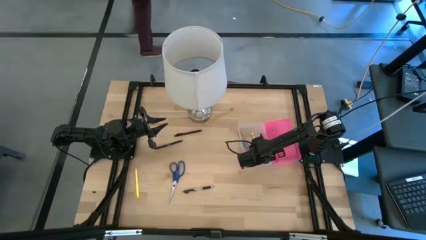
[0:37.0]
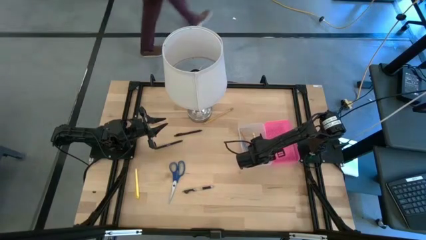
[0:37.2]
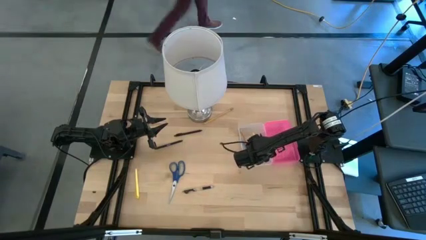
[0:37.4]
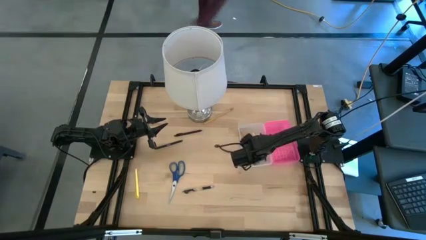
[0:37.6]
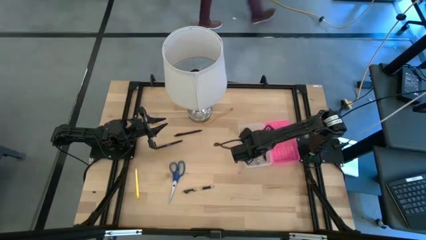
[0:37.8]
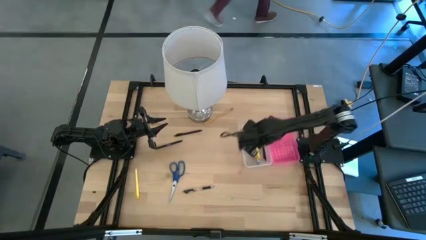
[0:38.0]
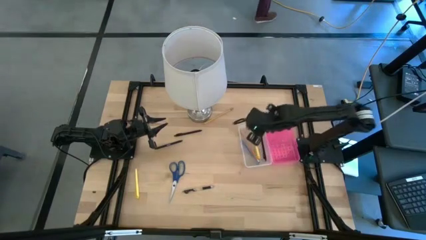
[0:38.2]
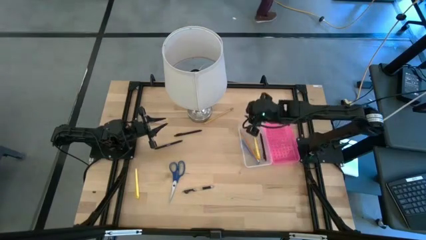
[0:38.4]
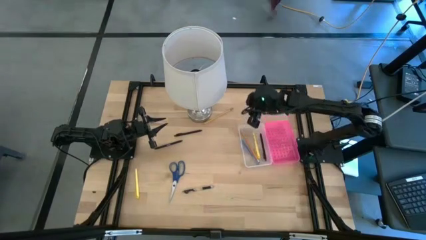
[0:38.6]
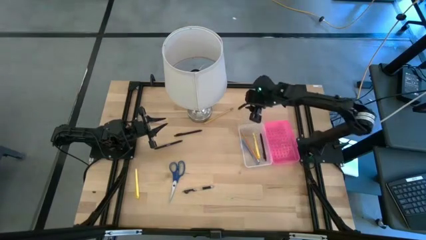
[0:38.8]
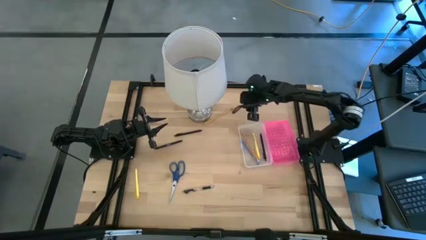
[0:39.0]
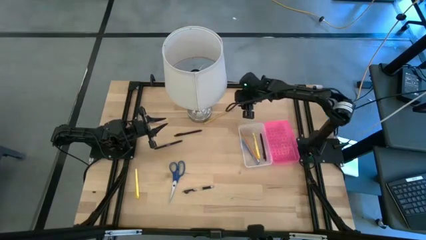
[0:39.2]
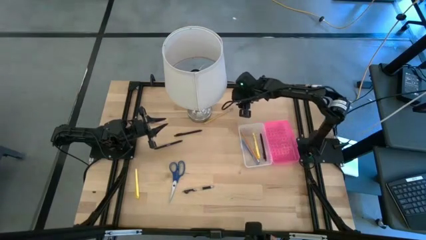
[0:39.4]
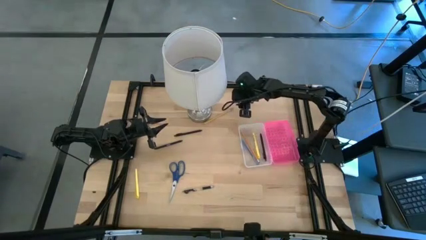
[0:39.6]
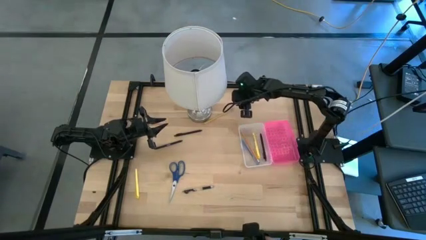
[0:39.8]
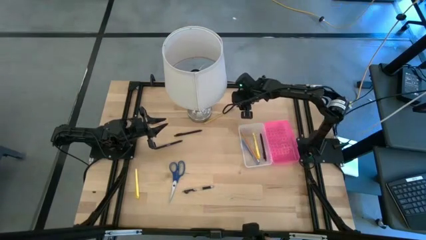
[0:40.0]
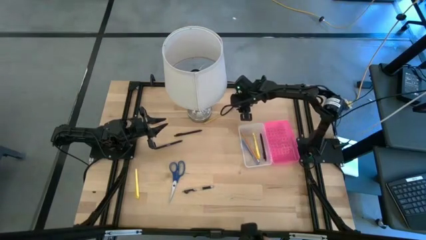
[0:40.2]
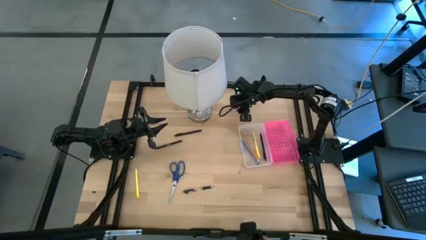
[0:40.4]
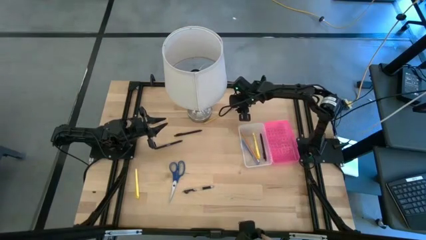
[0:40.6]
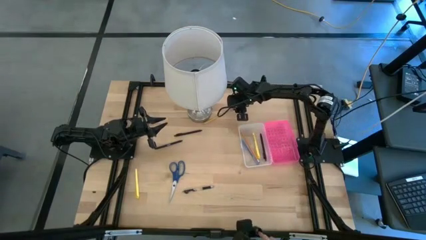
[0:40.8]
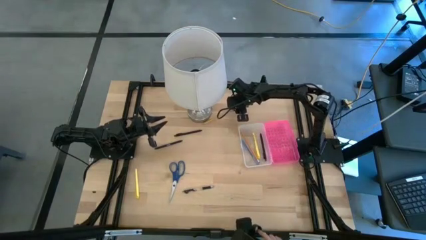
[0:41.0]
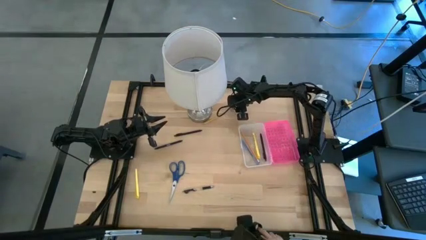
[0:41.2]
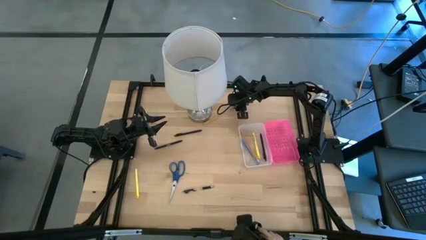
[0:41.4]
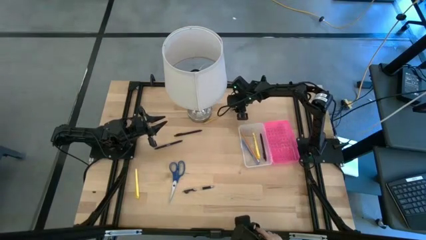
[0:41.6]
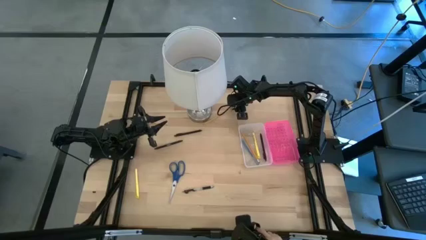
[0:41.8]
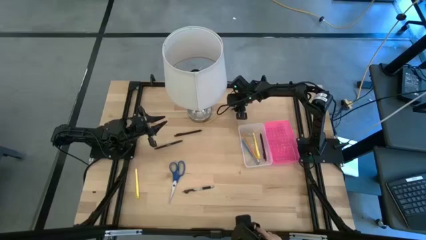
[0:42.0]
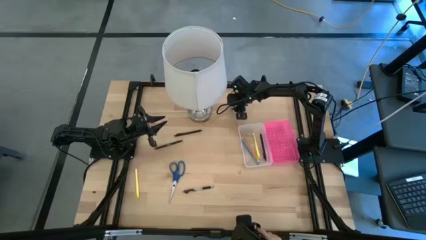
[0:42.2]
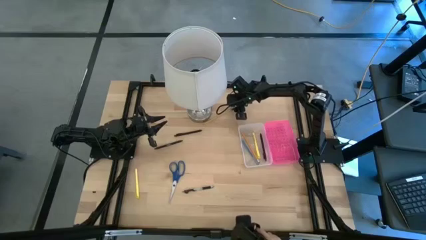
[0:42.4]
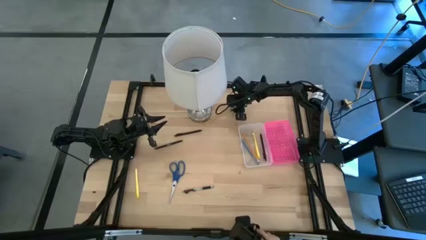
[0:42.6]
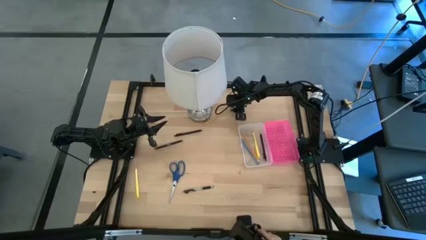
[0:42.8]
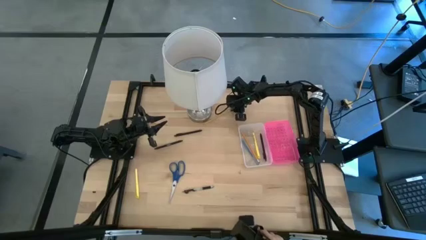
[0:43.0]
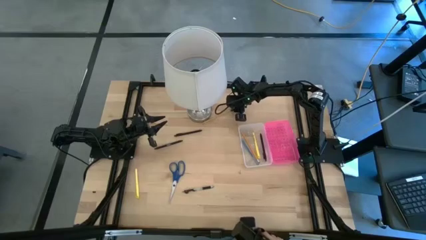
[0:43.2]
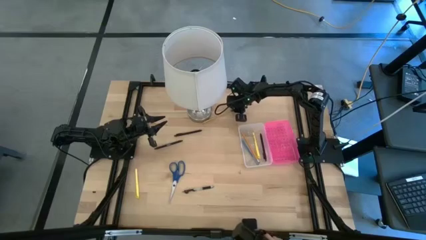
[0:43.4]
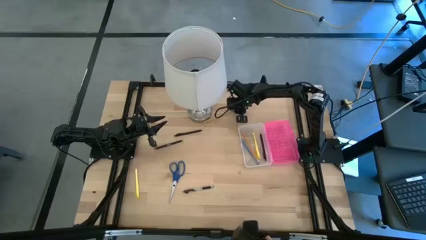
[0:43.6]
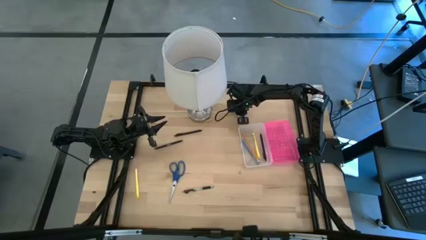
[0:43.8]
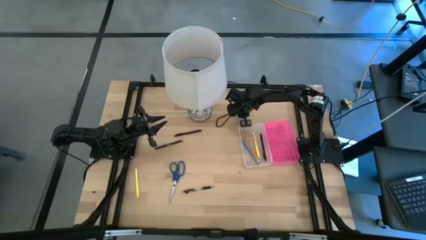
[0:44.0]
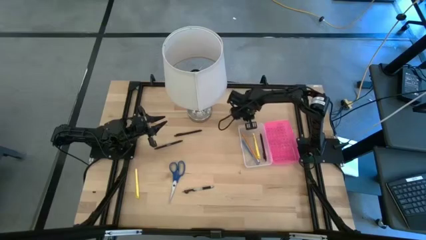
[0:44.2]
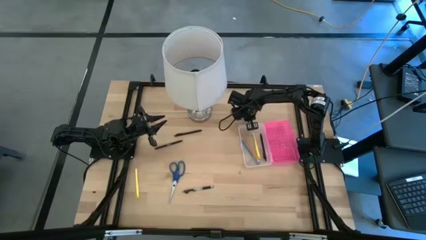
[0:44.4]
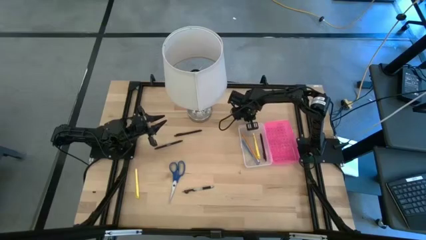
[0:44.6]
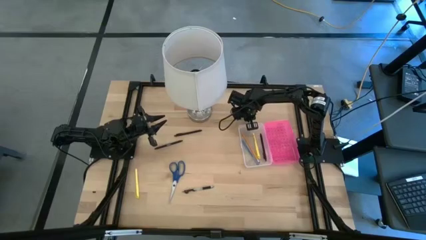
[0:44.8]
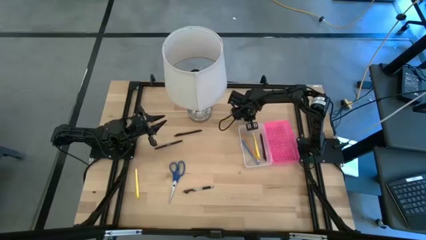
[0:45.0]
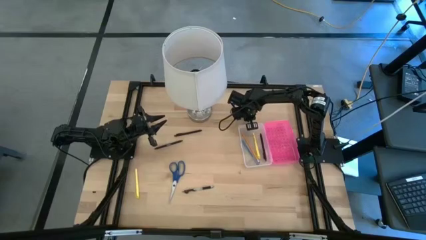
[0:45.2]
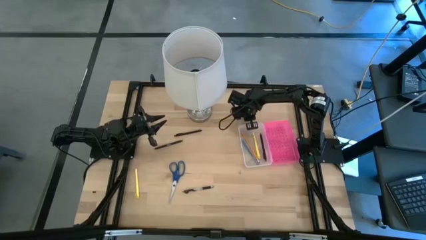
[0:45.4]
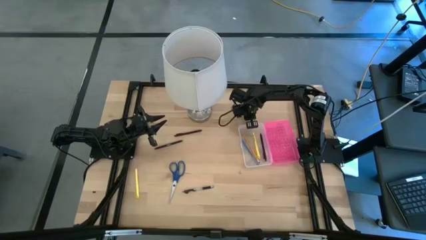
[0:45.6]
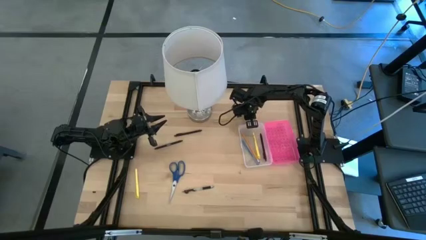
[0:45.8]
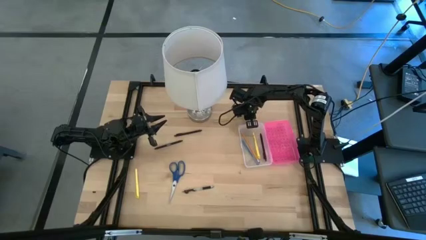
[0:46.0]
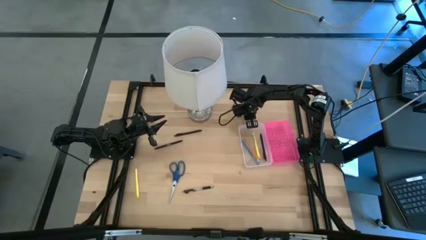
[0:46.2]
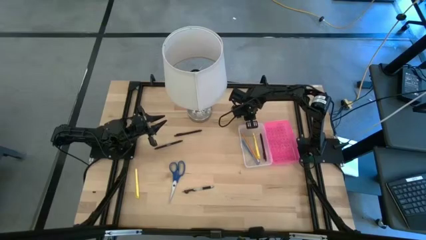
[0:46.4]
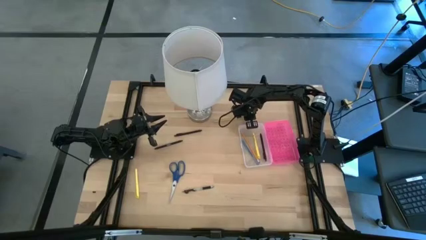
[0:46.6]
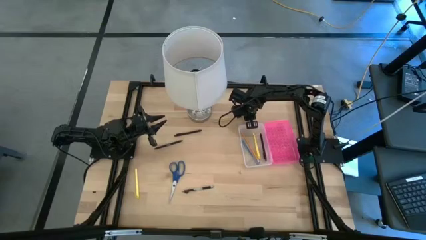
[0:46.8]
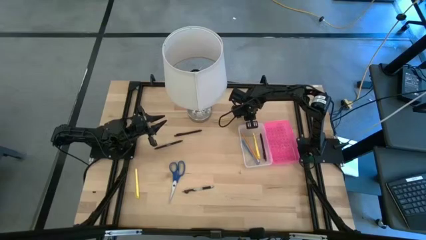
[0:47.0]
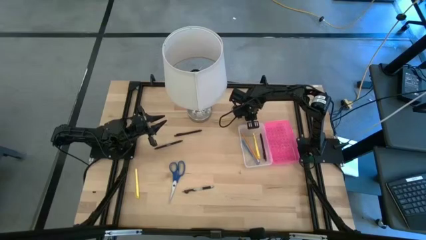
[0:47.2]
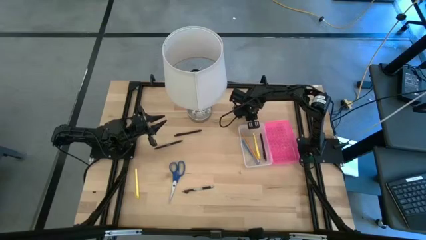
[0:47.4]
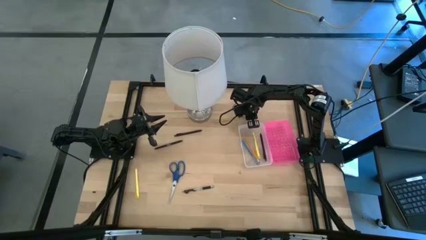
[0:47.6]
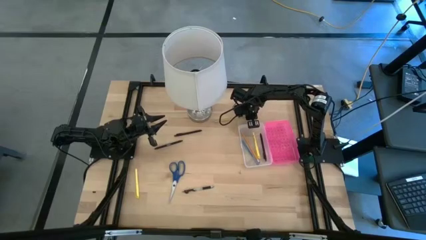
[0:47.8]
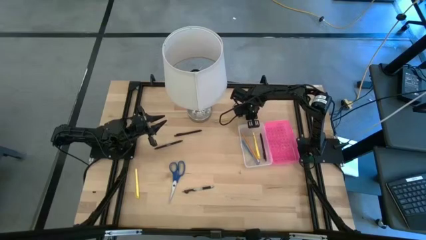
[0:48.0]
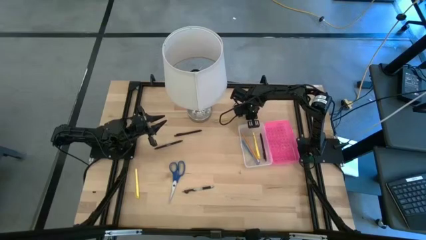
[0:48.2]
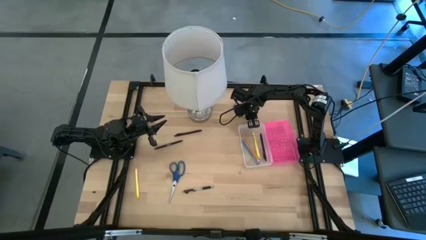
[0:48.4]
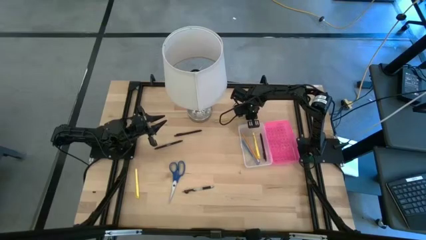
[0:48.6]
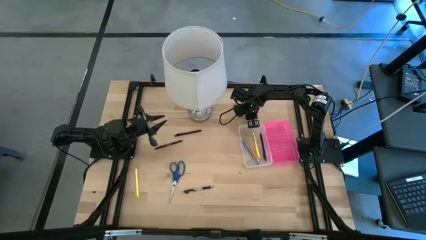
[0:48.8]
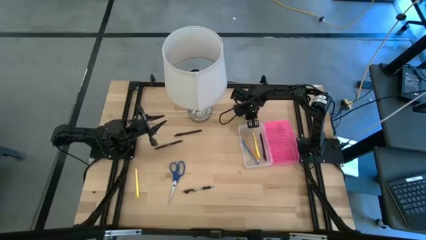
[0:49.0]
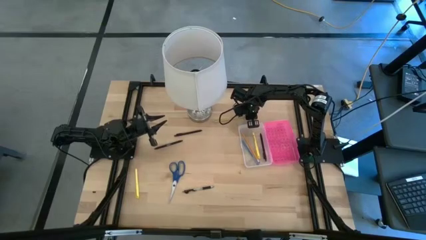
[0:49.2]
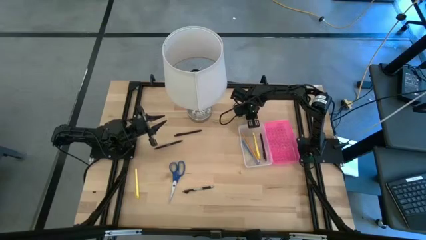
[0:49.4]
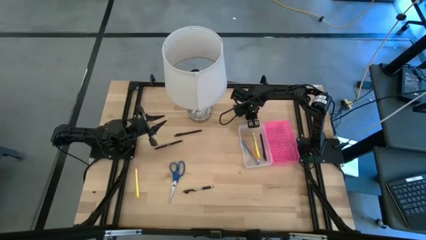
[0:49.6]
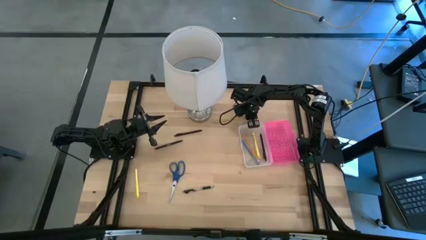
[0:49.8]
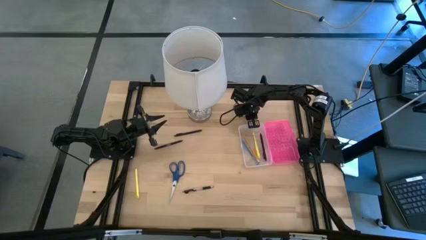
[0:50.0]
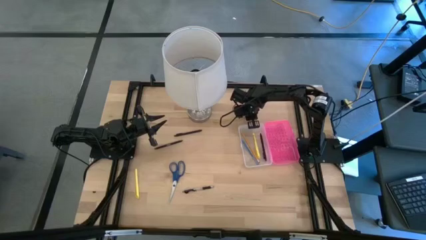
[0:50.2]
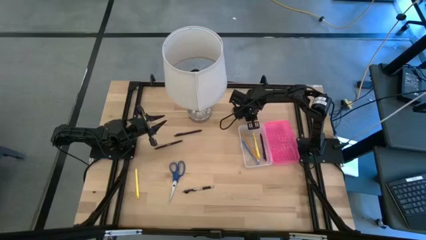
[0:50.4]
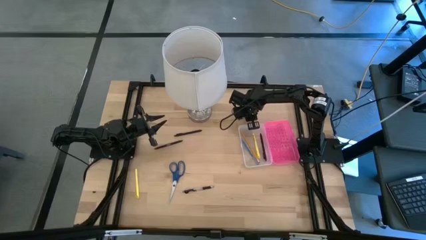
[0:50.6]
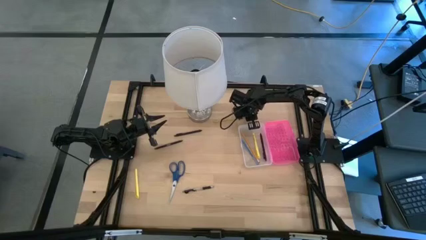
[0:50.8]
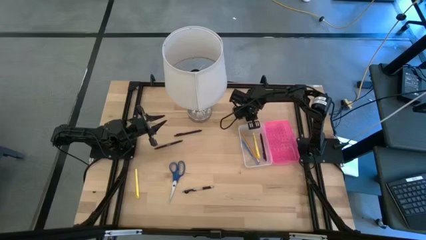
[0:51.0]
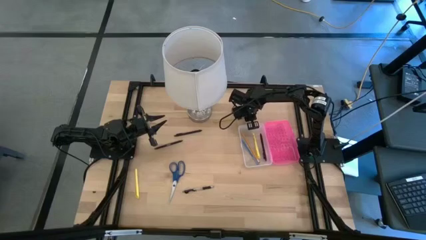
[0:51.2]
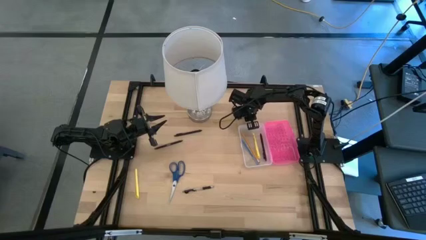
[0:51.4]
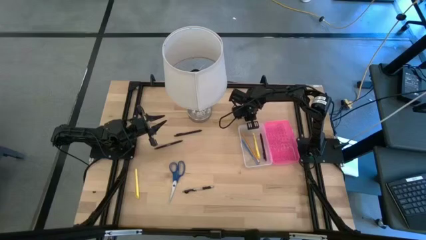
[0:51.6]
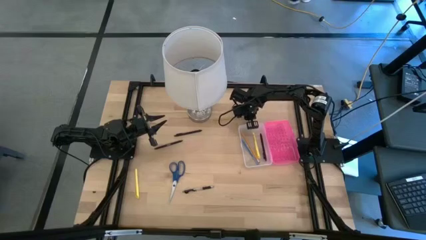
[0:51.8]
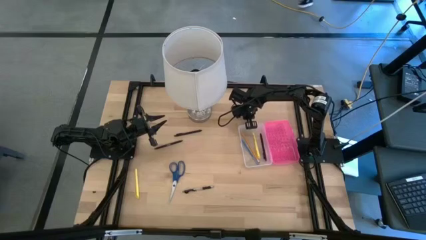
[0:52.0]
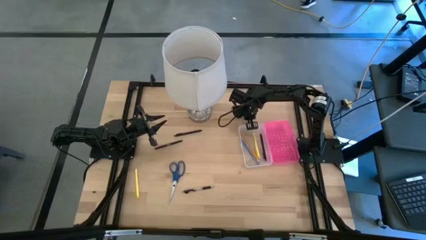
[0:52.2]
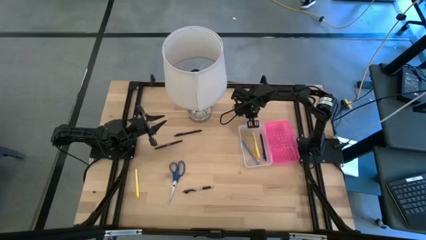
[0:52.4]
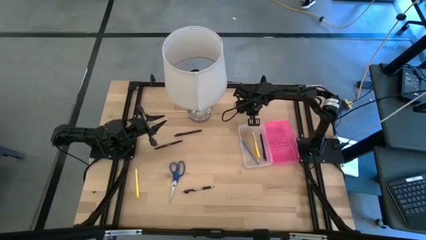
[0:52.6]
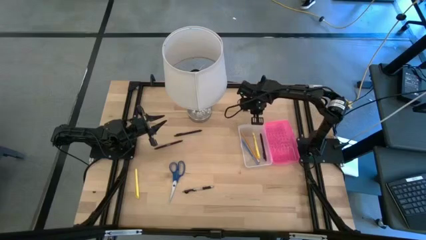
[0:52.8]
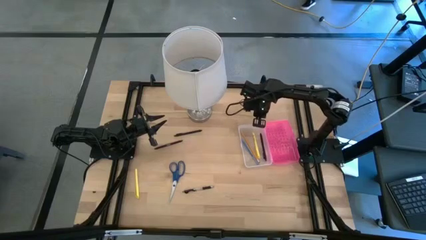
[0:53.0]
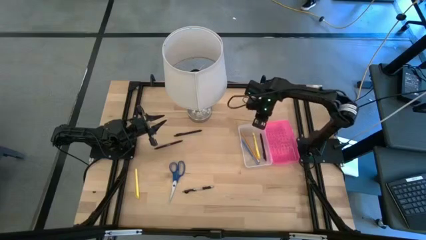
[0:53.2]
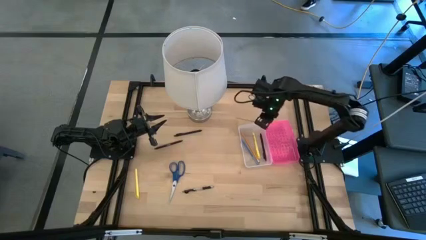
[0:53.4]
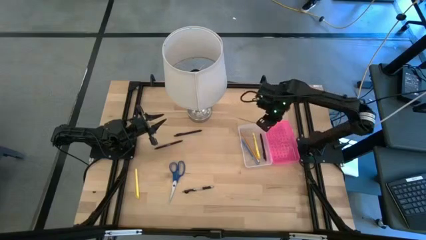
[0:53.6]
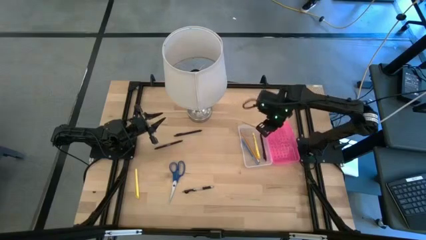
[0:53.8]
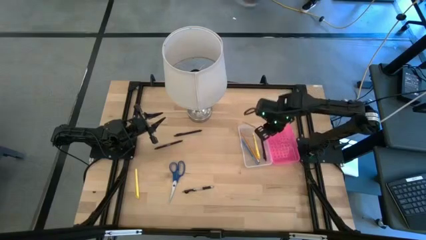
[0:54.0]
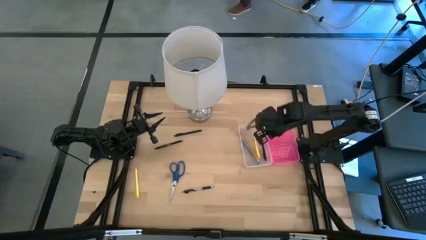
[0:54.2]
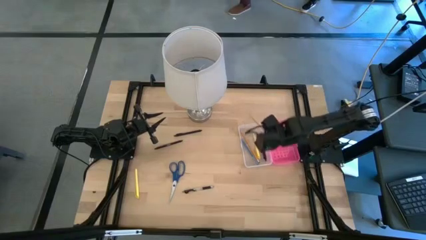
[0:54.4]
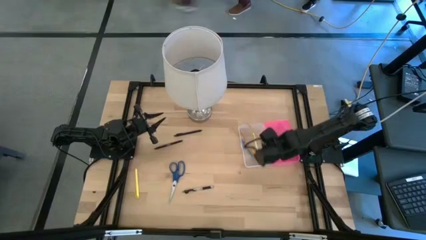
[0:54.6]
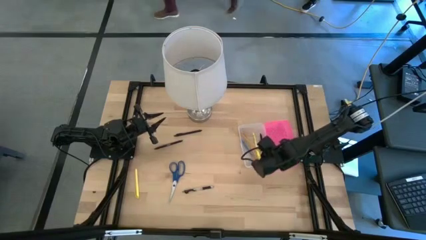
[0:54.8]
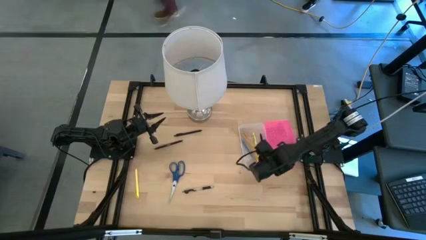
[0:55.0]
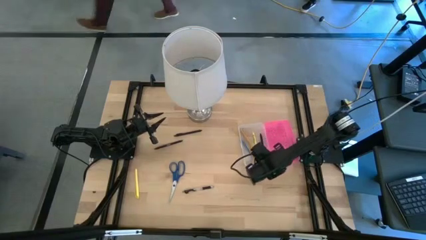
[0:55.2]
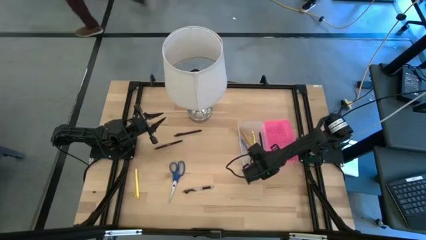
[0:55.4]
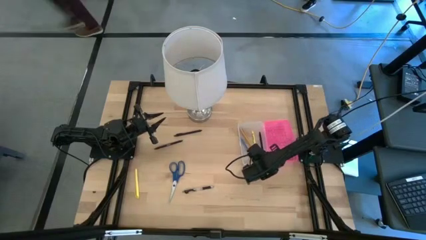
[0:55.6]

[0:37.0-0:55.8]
Task: Pick & place school supplies into a supply box
Put the yellow pencil into the supply box
